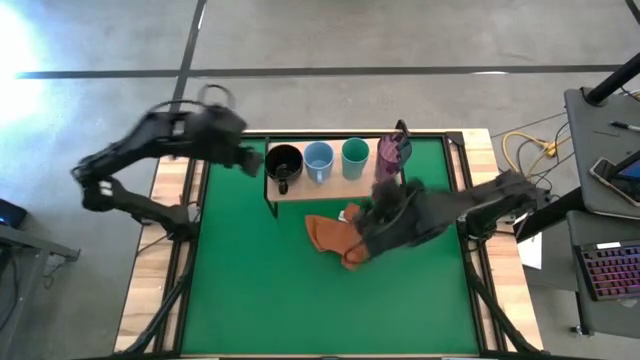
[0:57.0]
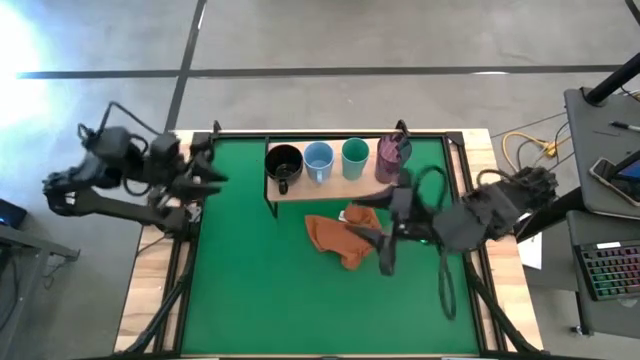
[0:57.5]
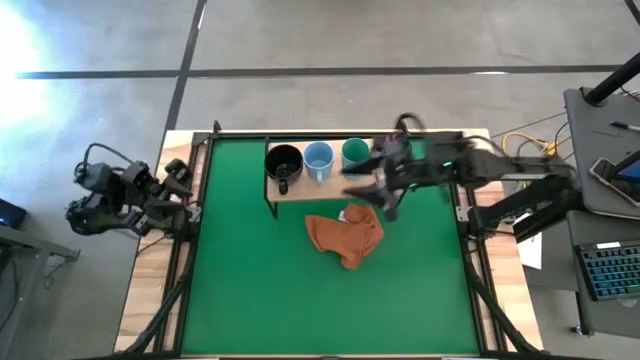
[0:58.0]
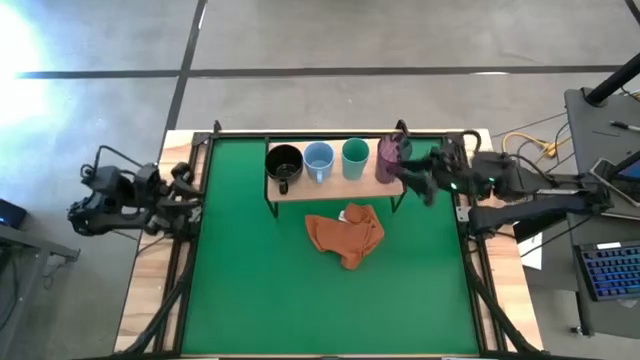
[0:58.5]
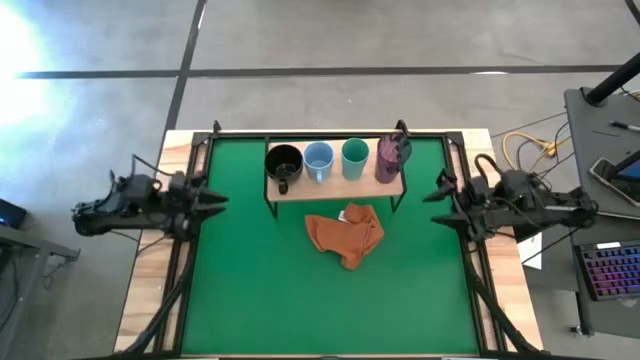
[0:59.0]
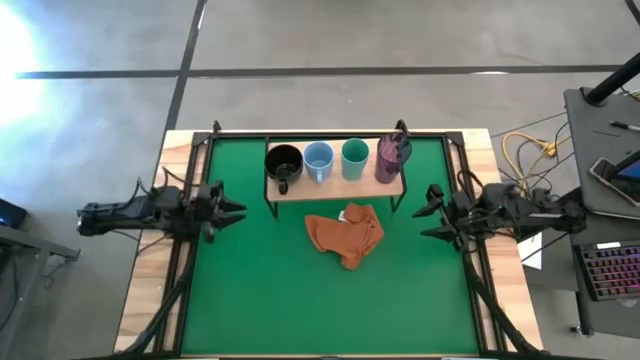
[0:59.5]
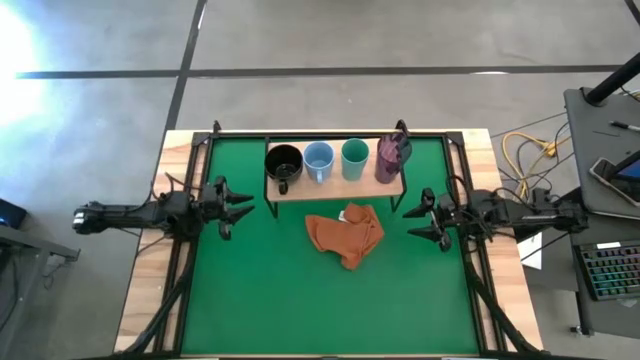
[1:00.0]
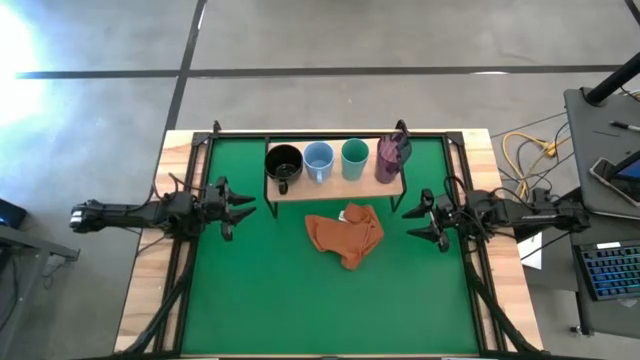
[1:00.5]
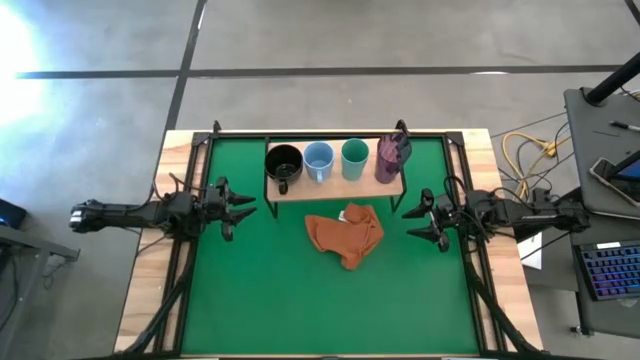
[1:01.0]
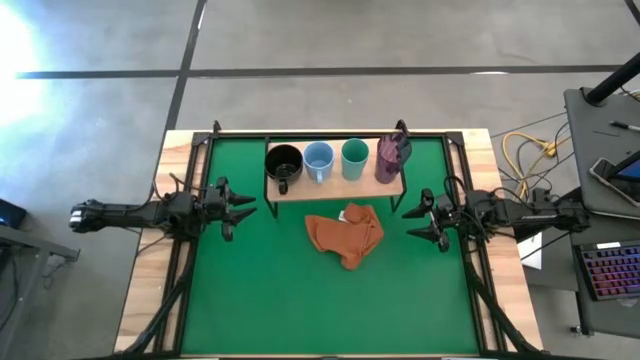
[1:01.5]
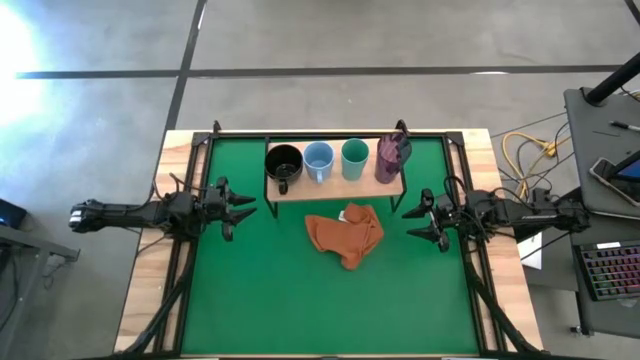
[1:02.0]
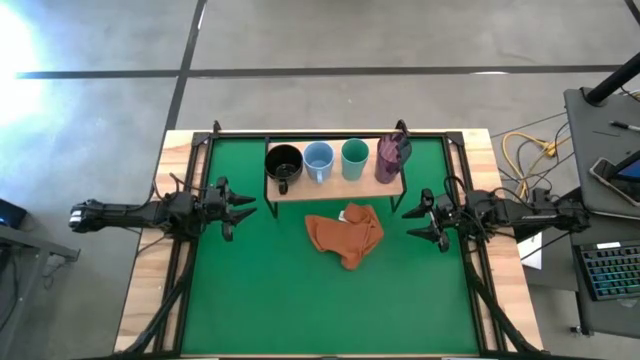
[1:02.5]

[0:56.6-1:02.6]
Task: Stack small to large cups/mugs on shelf
Return to Home Position

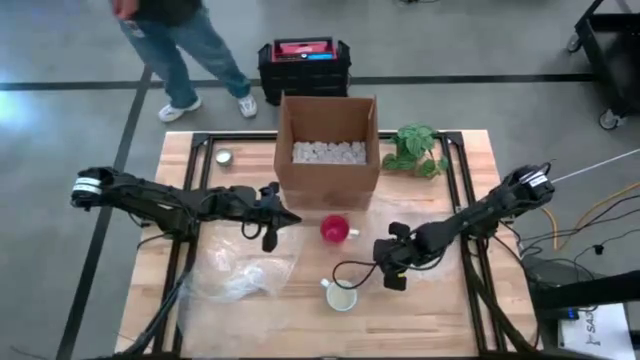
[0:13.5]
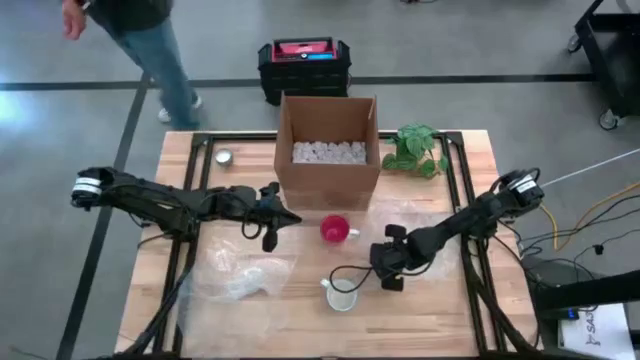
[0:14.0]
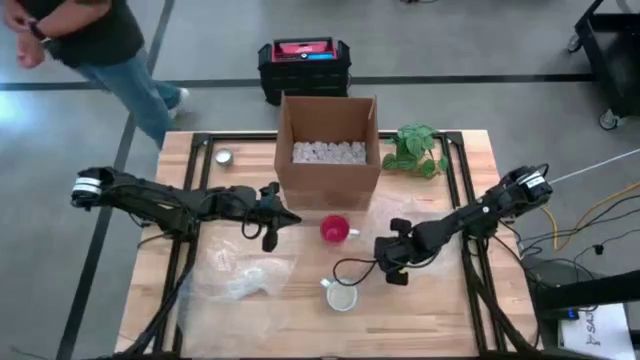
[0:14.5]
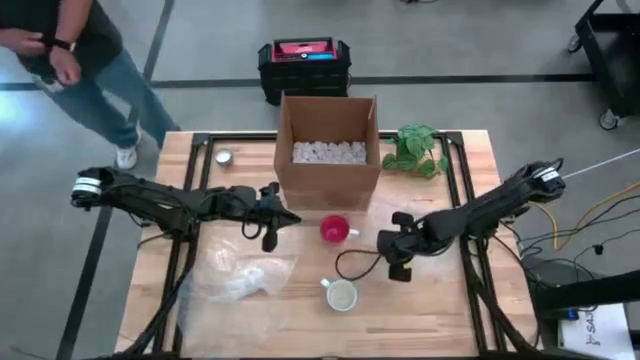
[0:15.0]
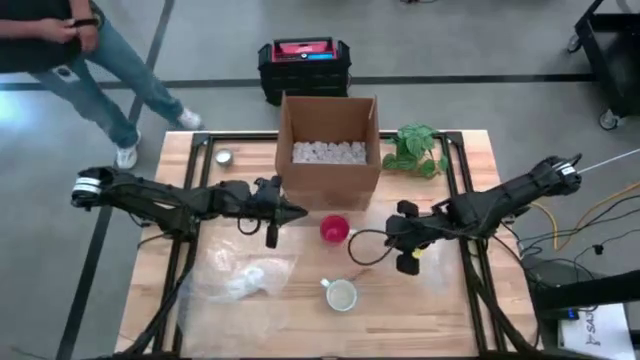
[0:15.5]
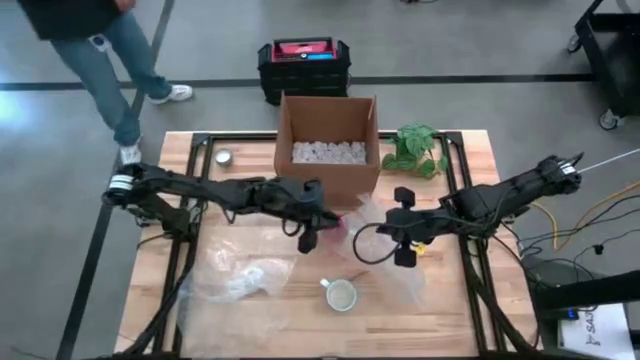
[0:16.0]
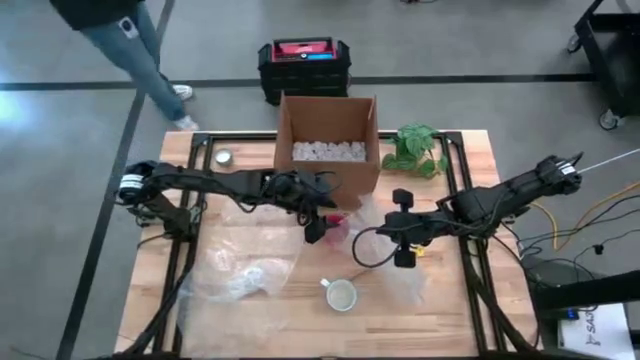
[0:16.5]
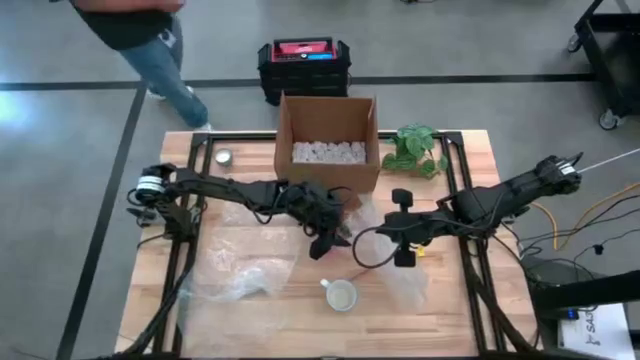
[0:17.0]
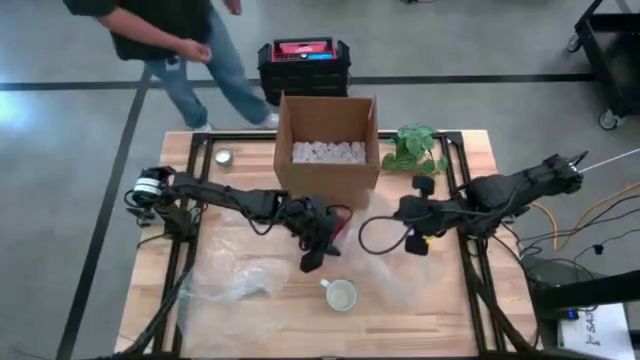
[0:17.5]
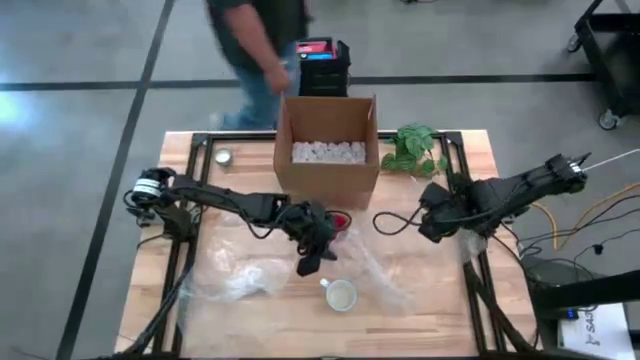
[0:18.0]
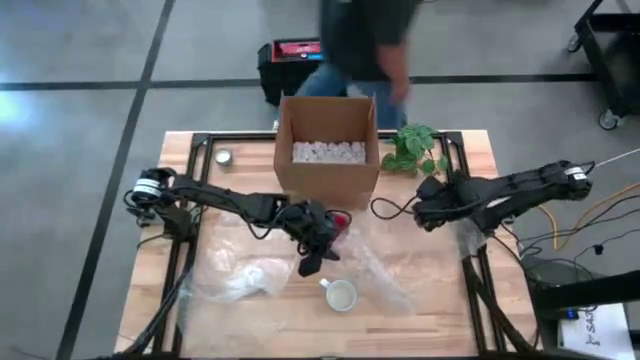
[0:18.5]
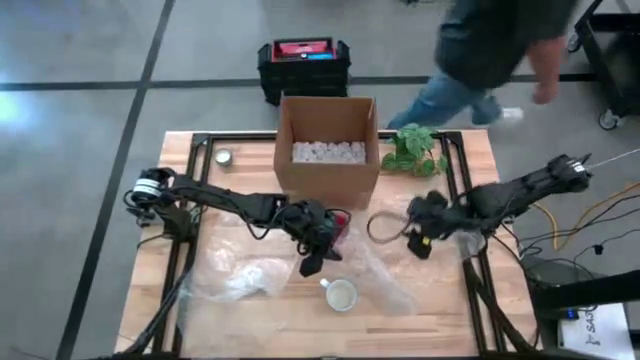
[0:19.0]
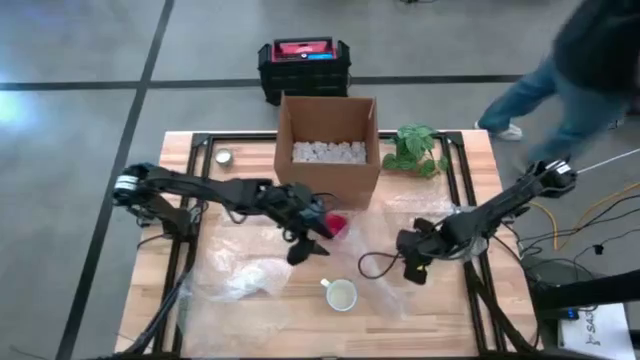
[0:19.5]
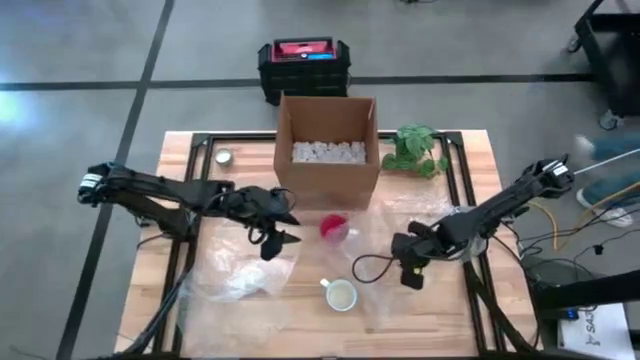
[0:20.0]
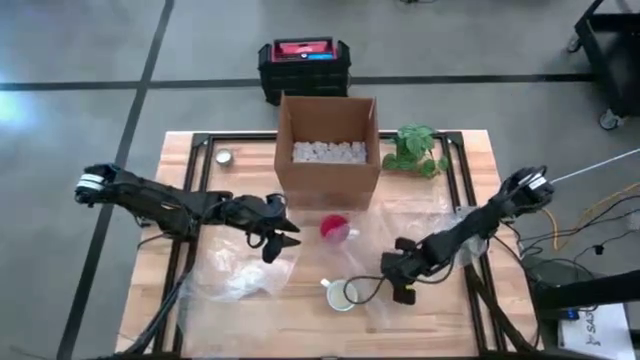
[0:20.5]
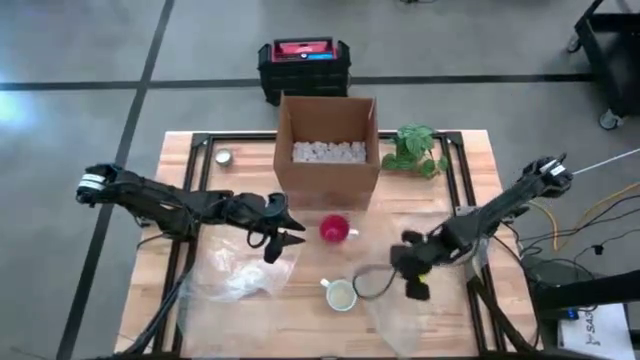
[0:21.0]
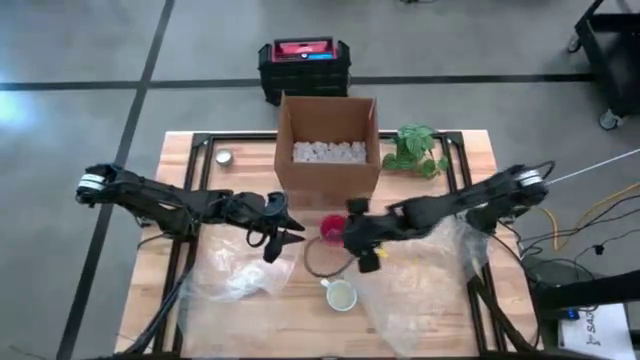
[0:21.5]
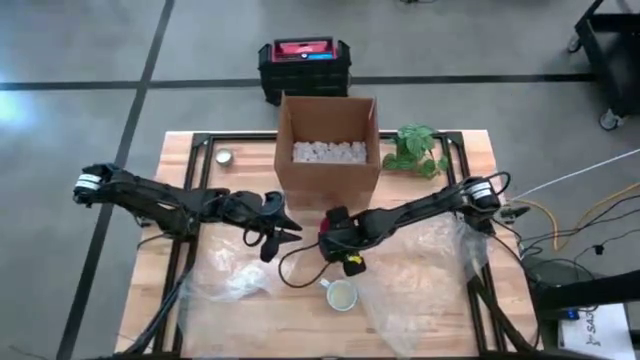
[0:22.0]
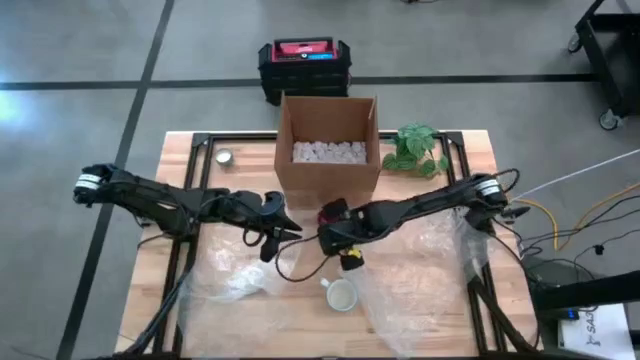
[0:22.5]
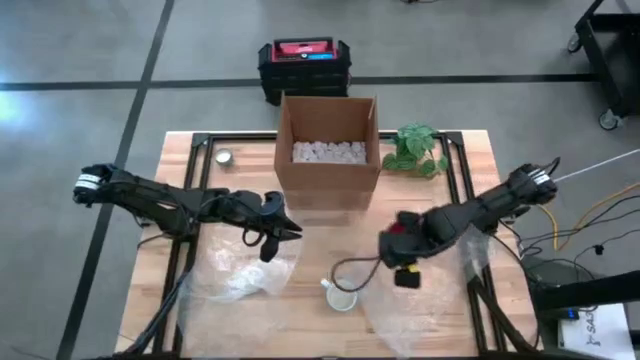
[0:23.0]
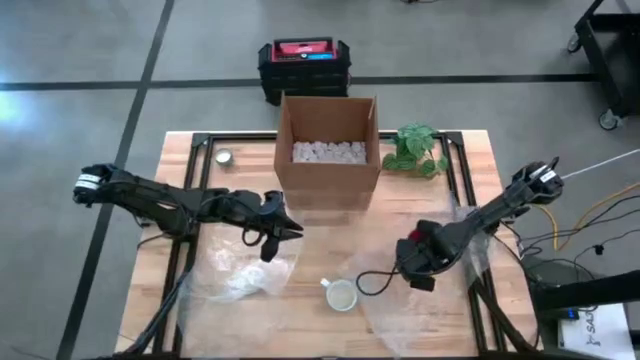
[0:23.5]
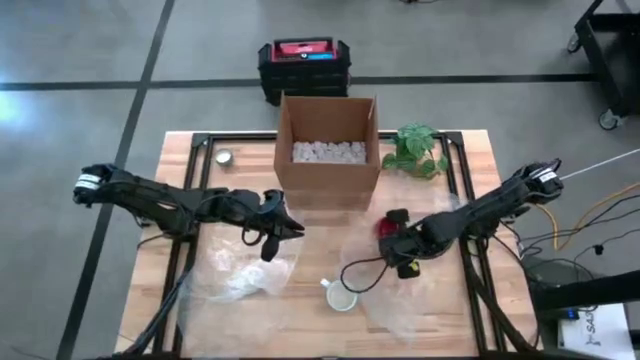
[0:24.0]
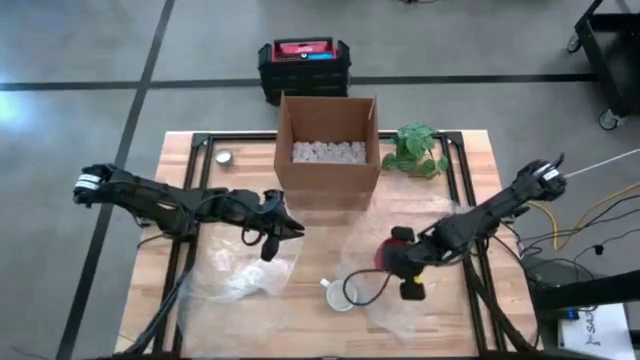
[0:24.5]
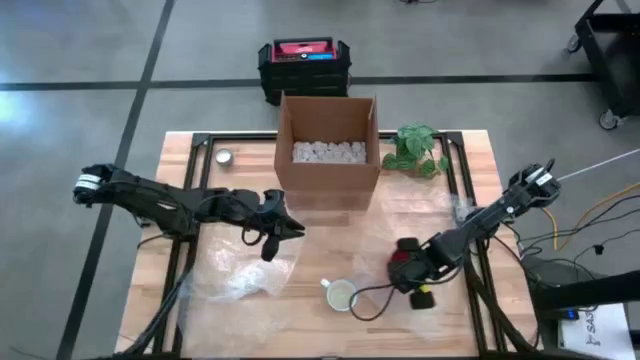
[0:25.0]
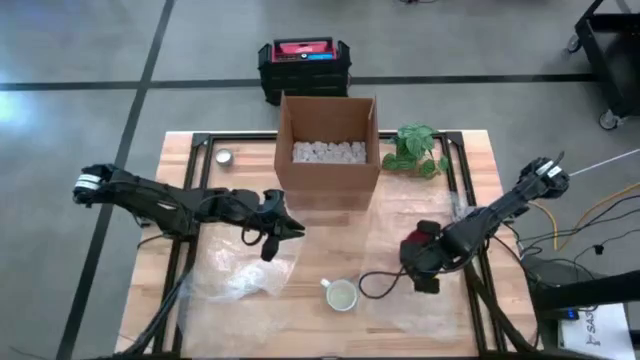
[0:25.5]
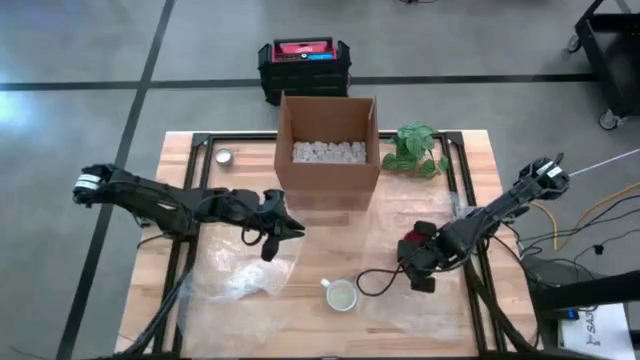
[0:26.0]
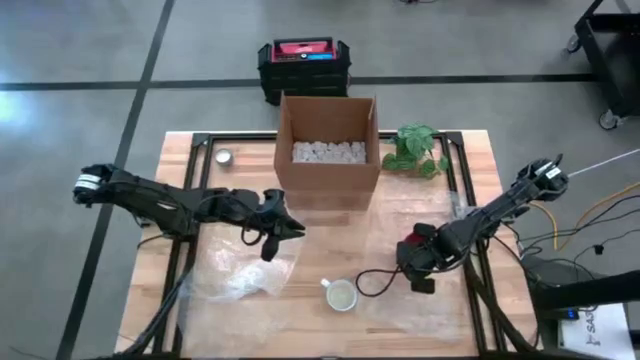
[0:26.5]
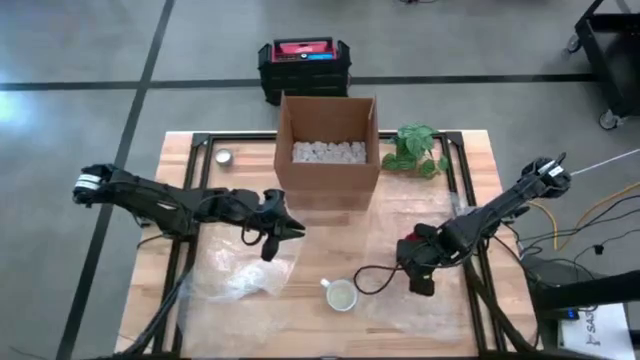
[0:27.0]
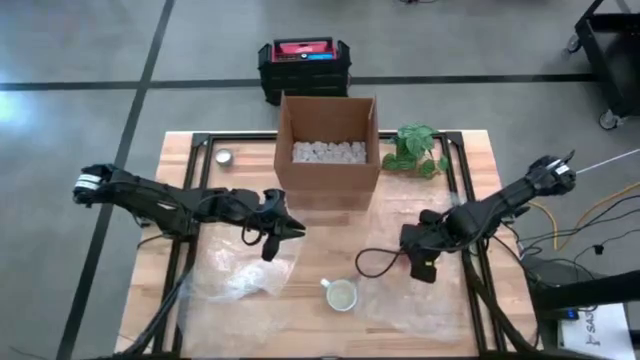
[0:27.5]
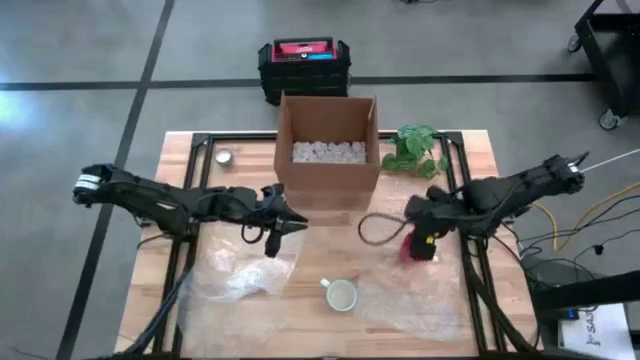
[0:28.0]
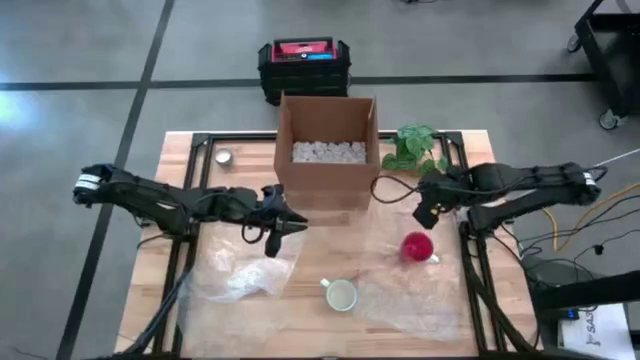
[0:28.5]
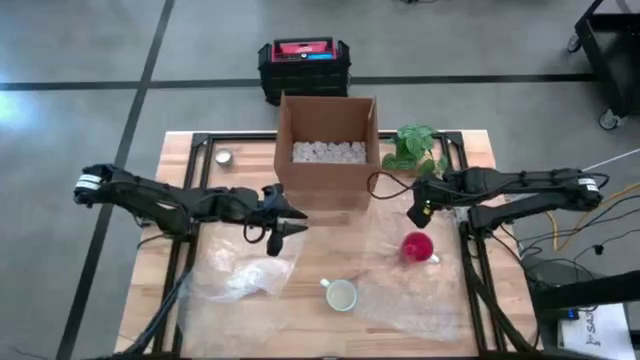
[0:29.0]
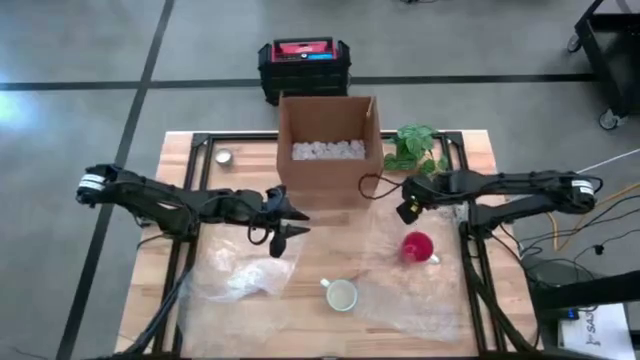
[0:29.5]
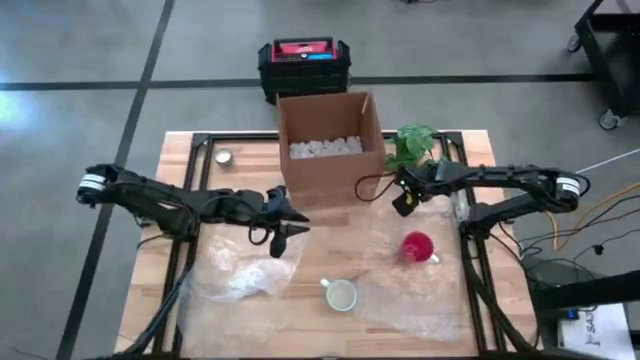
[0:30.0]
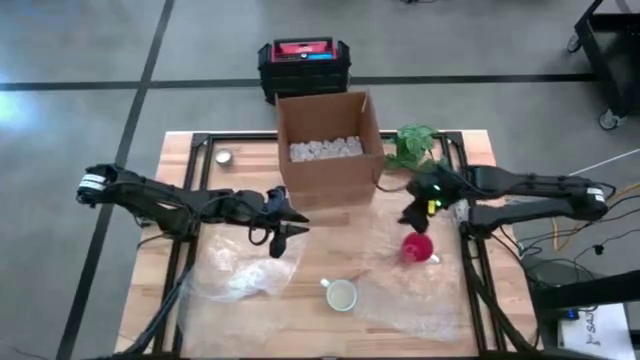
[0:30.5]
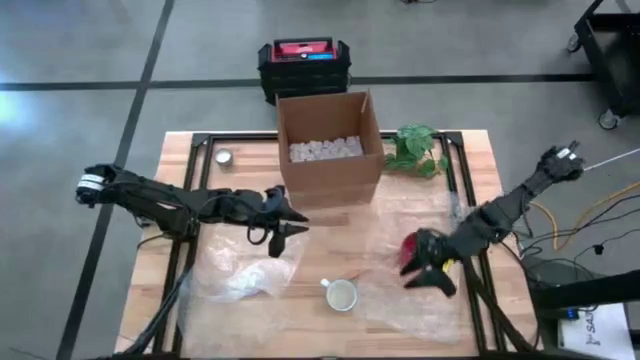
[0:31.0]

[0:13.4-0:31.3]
Task: wrap mug
Wrap the orange mug in bubble wrap
